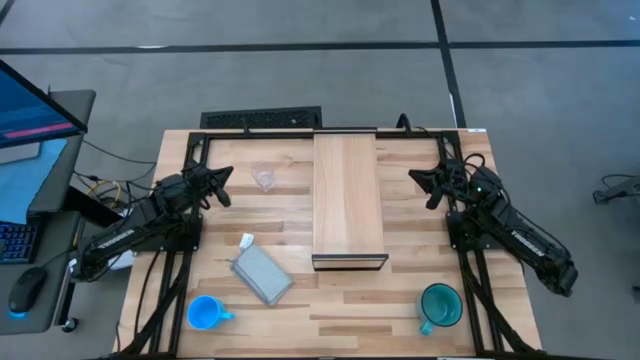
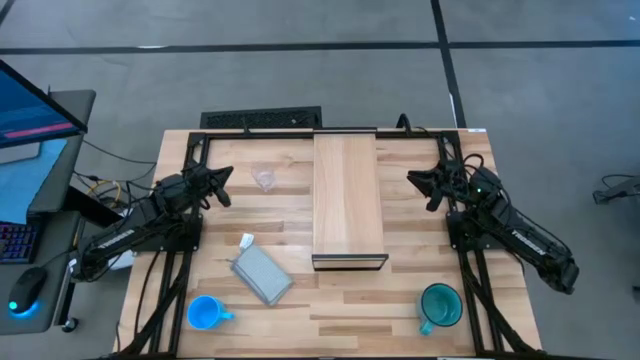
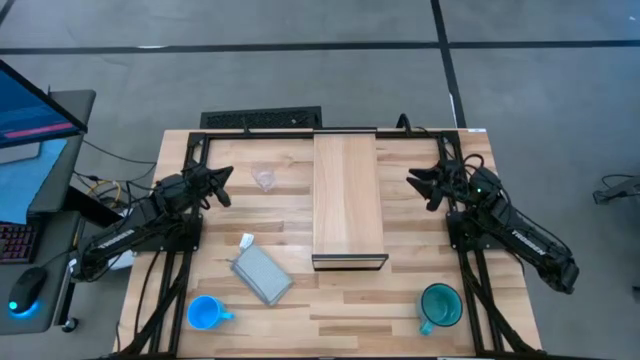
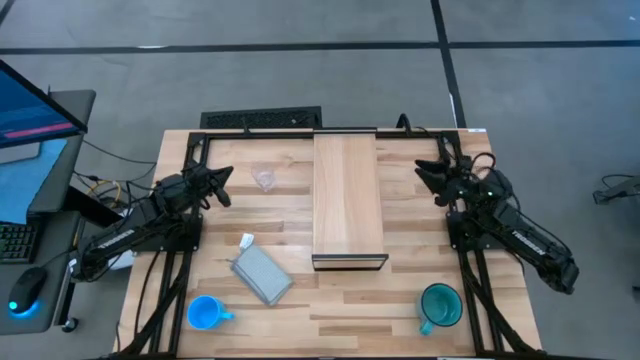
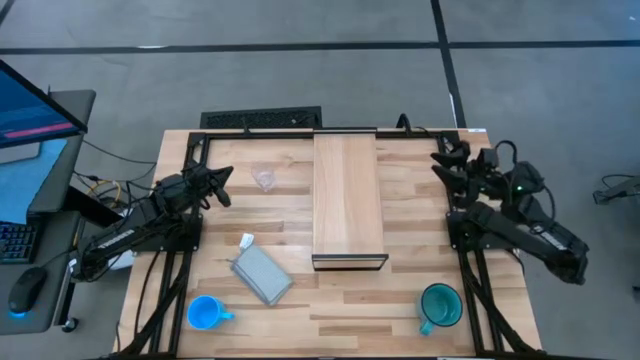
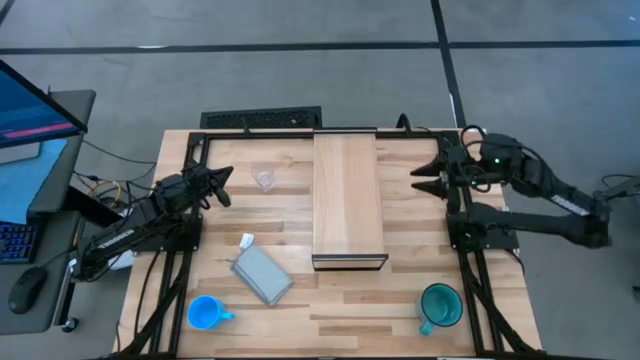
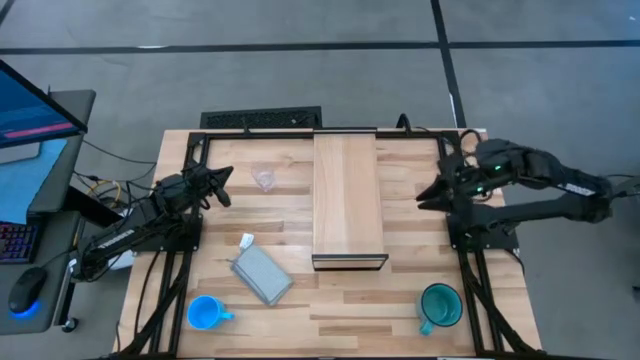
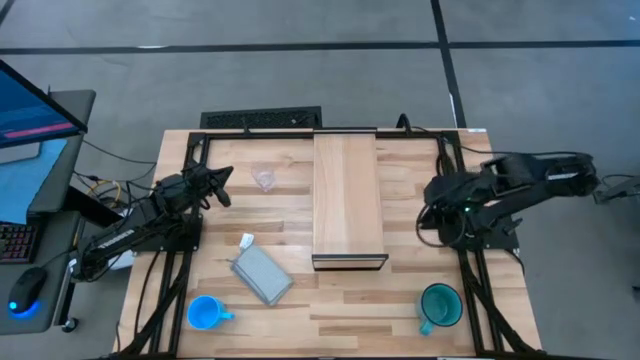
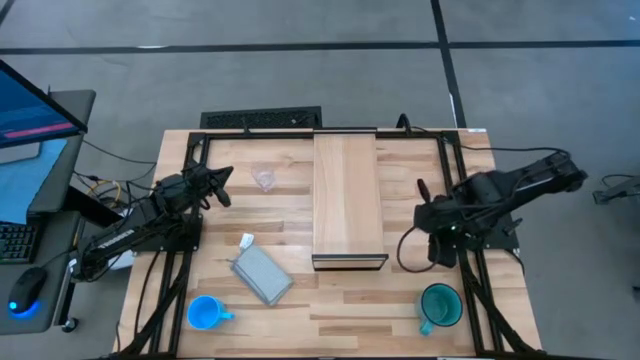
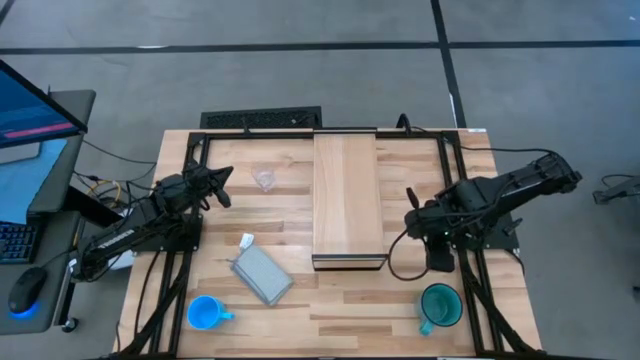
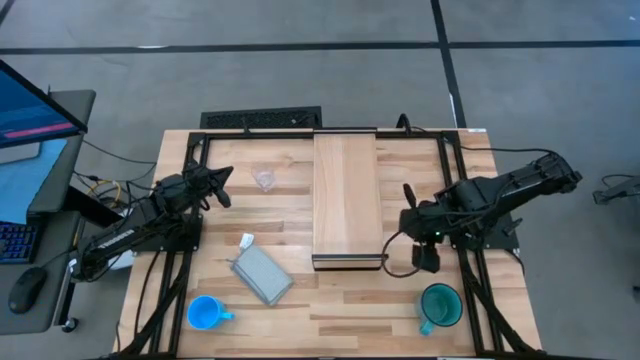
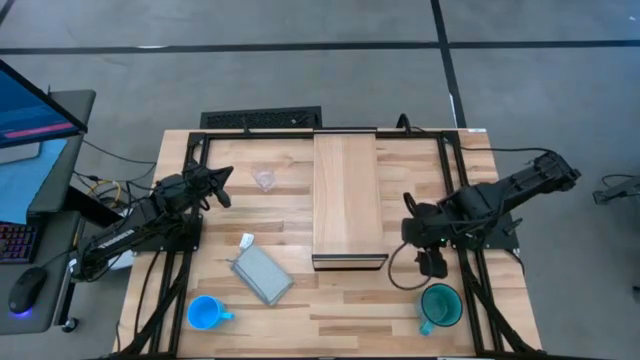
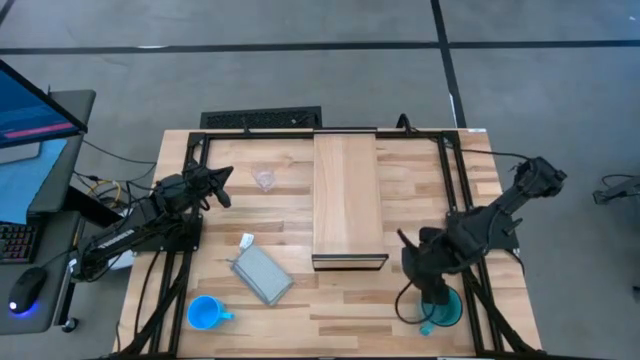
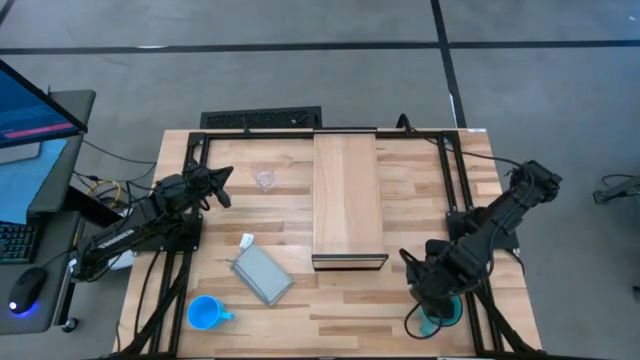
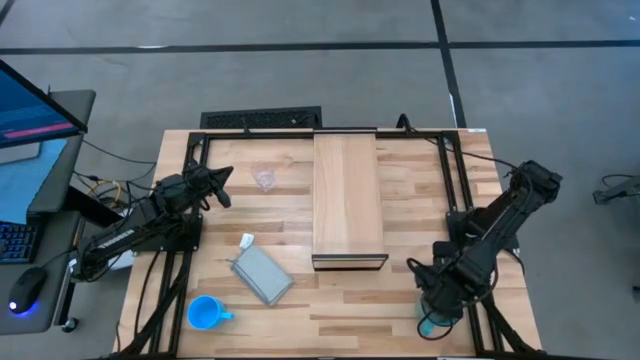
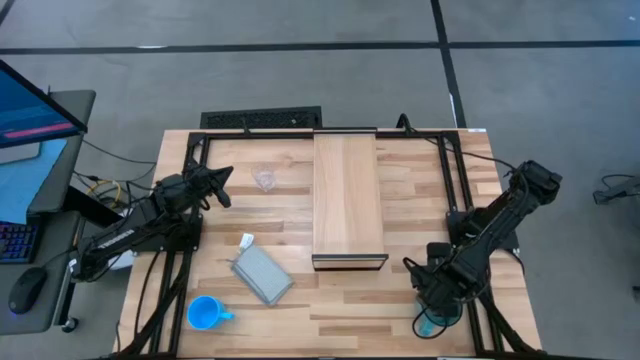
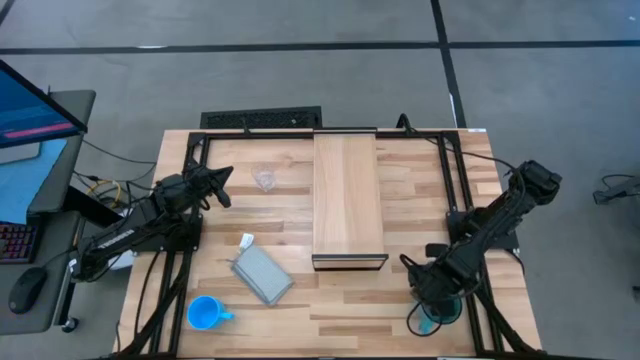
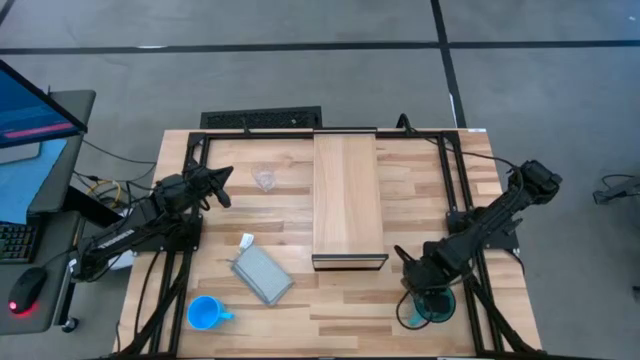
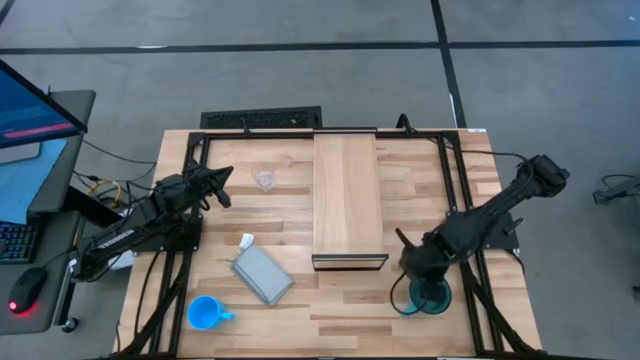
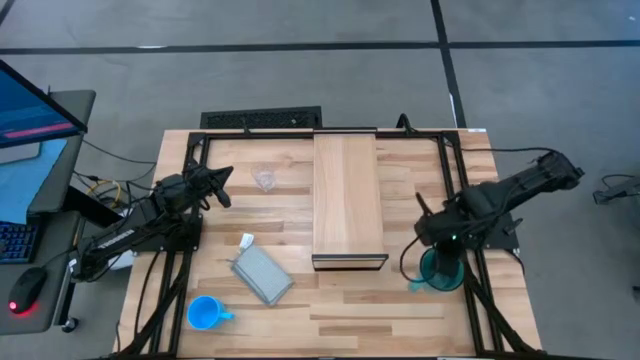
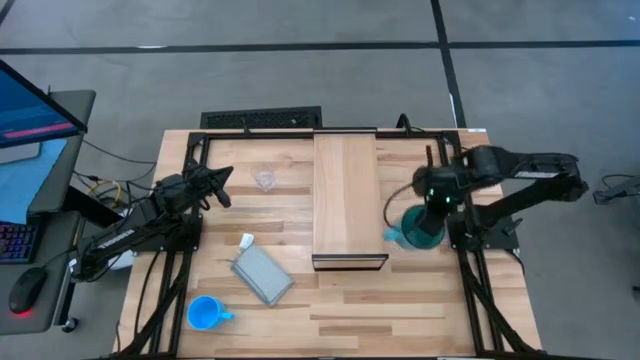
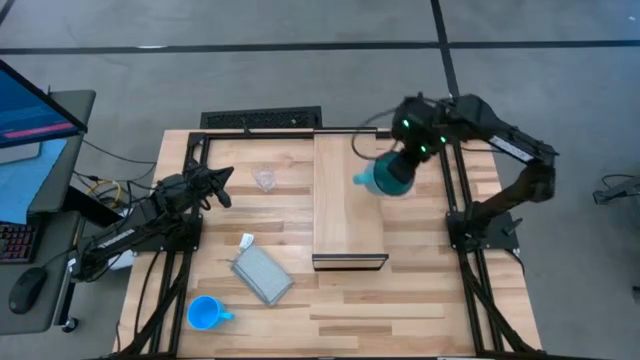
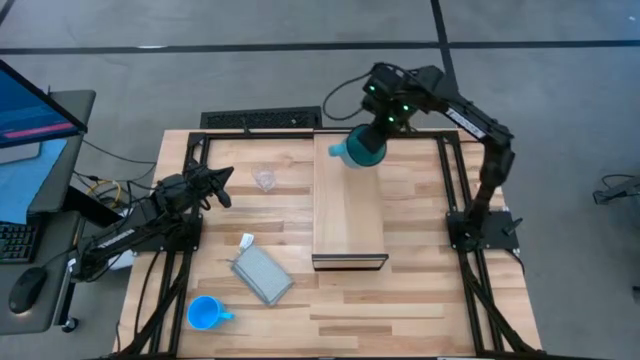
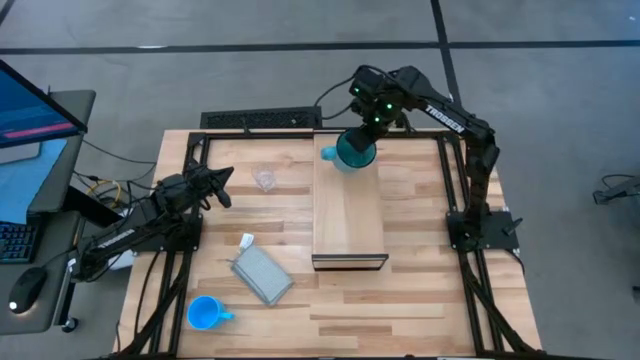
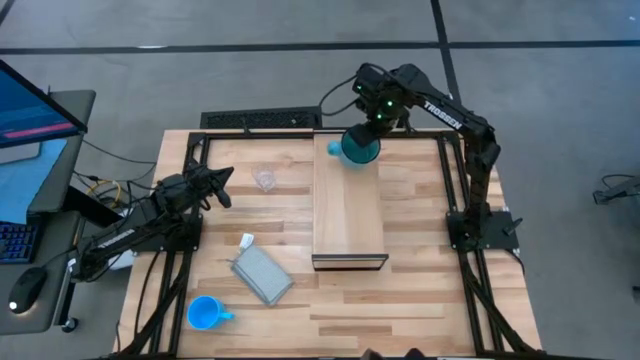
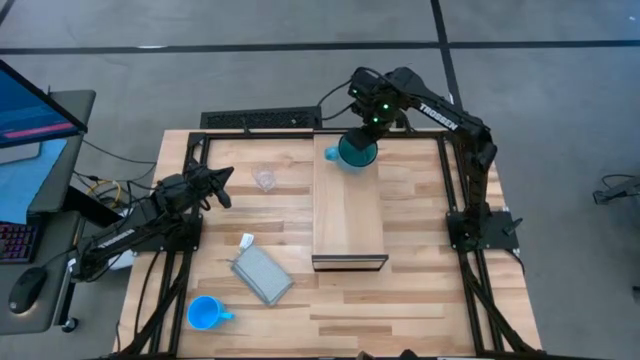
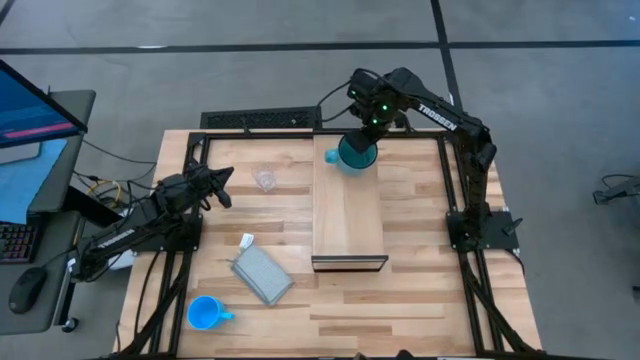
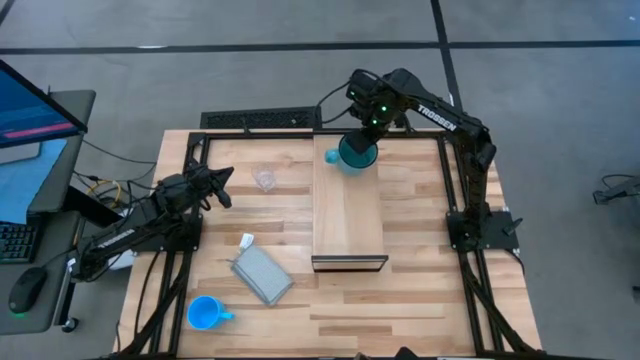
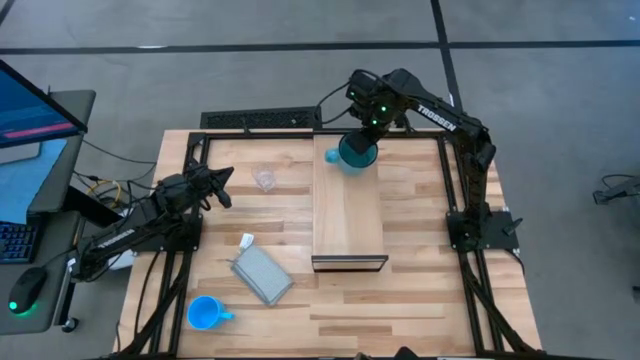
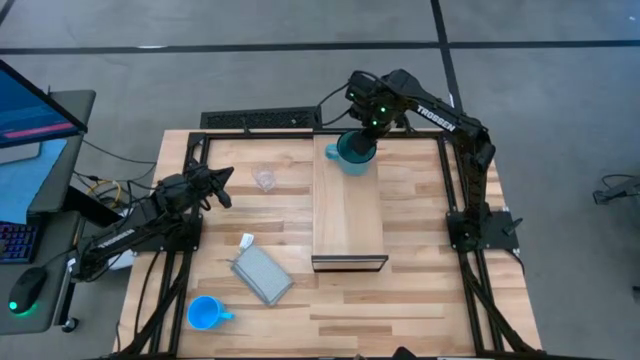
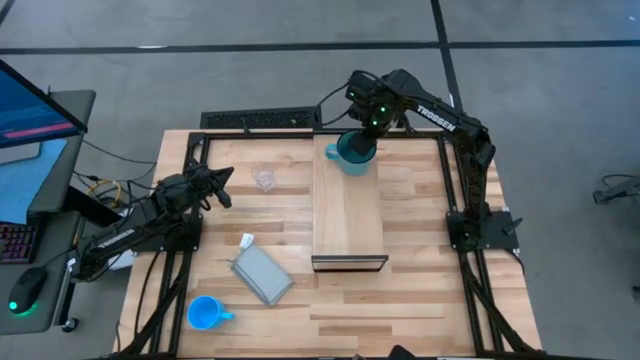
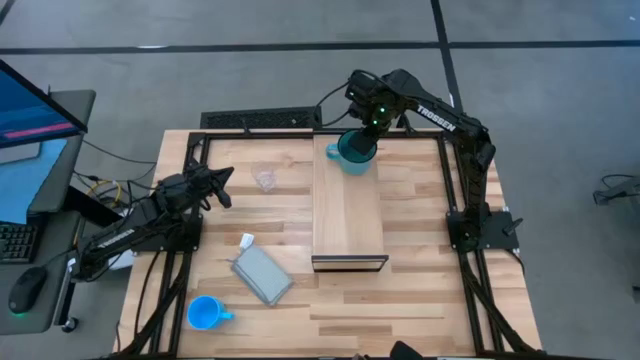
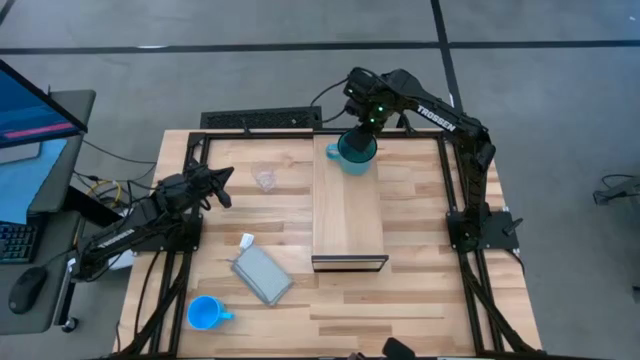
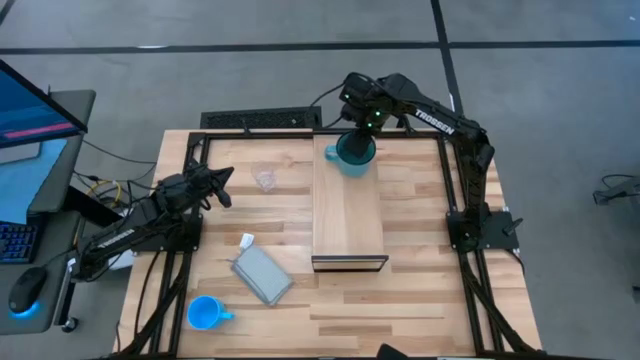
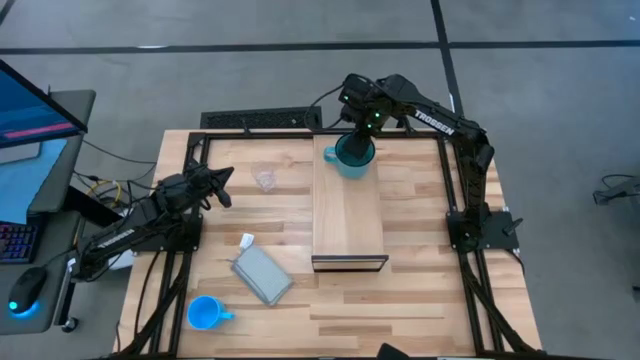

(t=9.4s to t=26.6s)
Task: Stack small to large cups/mugs on shelf
Put the blue mug on the shelf
